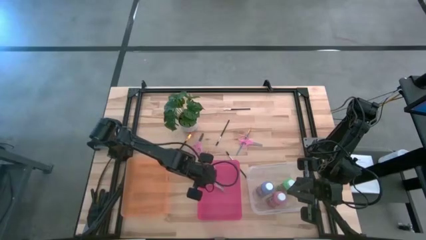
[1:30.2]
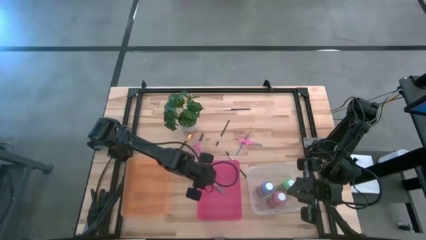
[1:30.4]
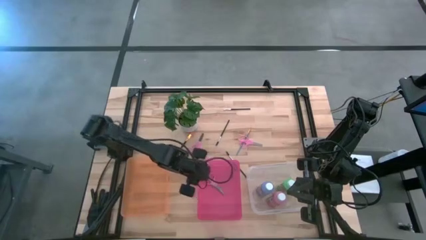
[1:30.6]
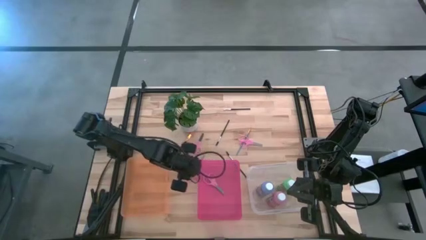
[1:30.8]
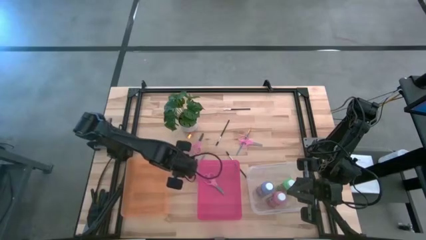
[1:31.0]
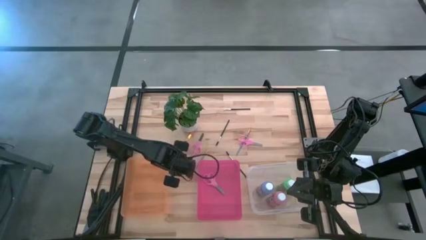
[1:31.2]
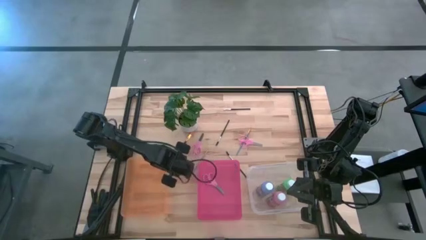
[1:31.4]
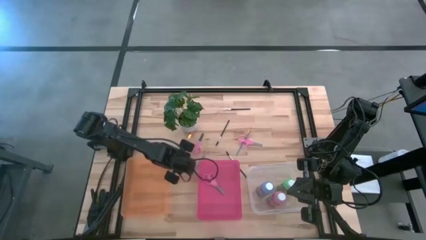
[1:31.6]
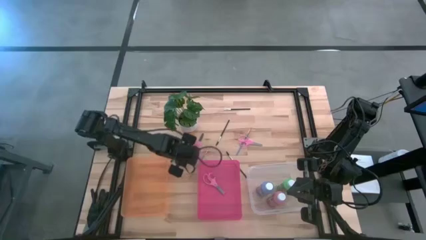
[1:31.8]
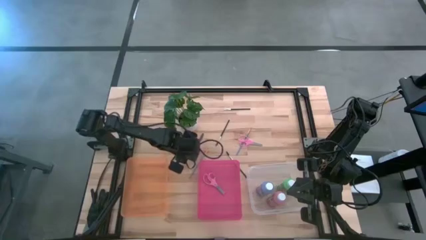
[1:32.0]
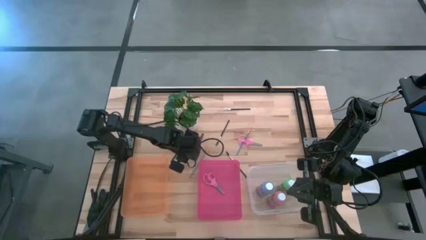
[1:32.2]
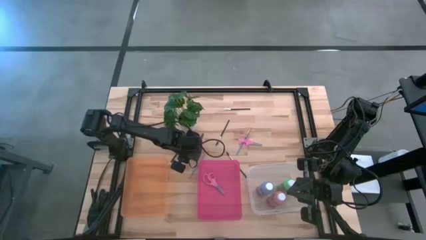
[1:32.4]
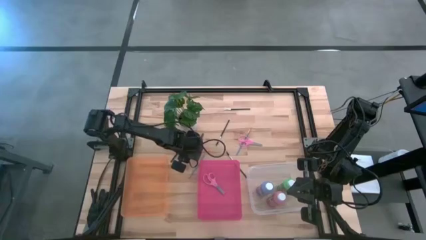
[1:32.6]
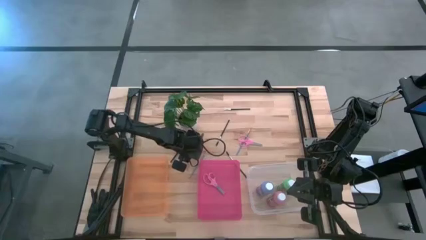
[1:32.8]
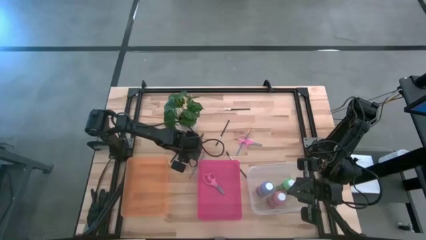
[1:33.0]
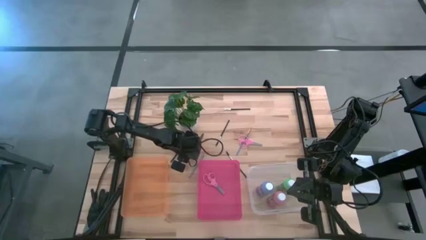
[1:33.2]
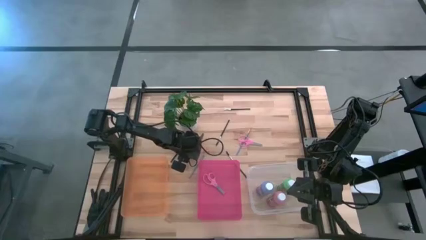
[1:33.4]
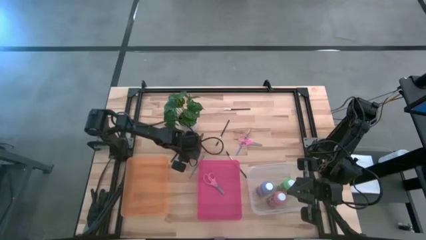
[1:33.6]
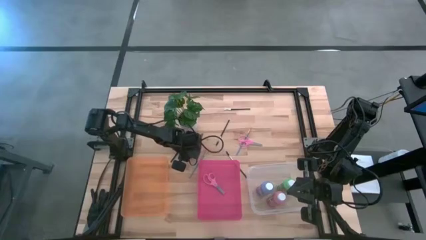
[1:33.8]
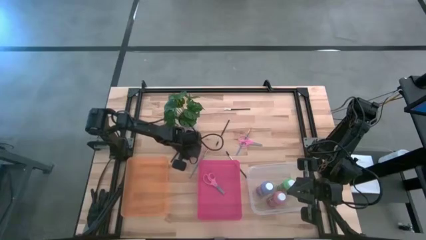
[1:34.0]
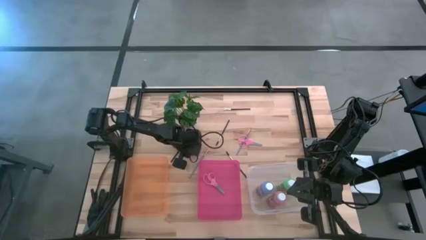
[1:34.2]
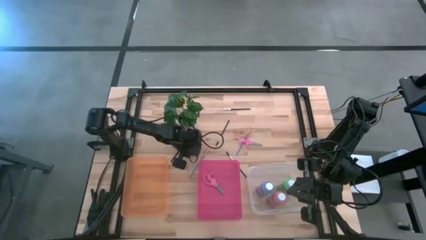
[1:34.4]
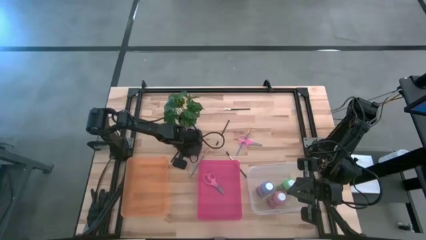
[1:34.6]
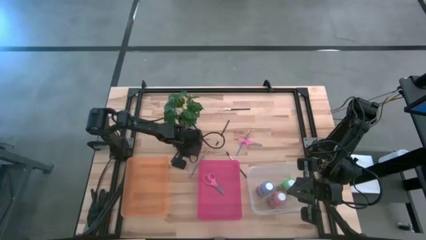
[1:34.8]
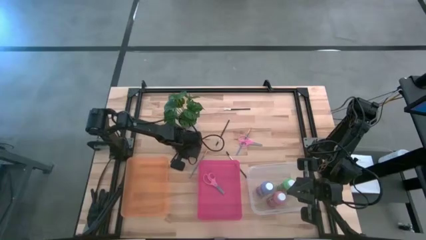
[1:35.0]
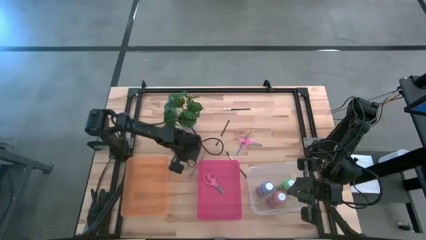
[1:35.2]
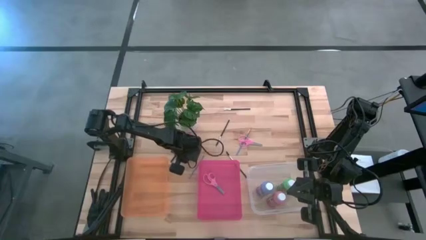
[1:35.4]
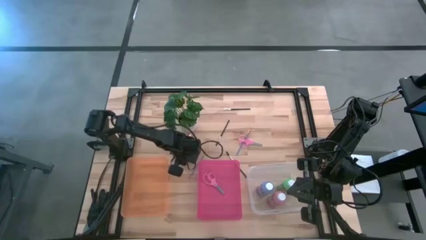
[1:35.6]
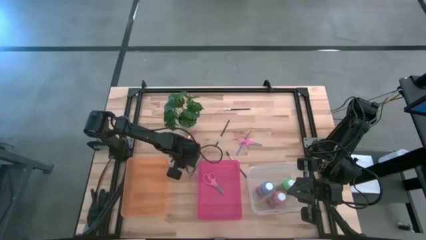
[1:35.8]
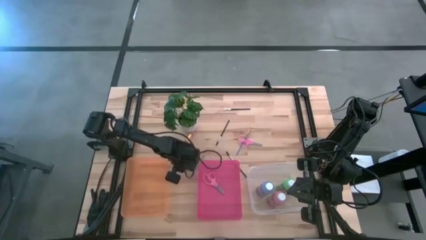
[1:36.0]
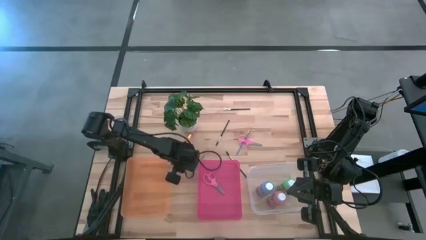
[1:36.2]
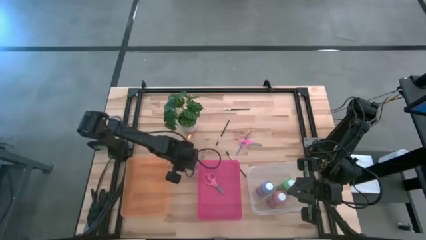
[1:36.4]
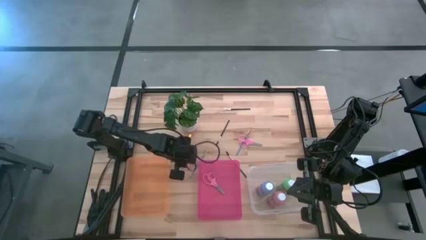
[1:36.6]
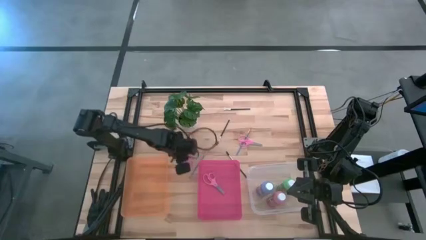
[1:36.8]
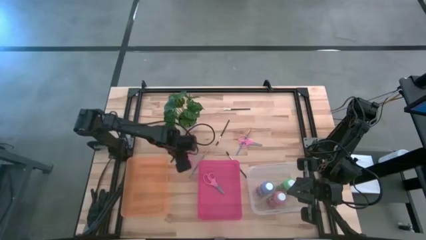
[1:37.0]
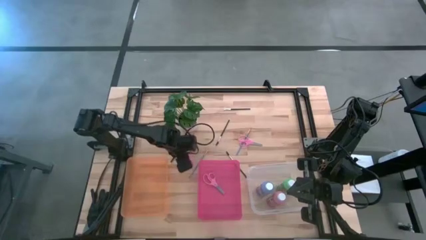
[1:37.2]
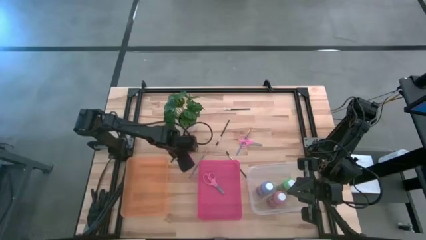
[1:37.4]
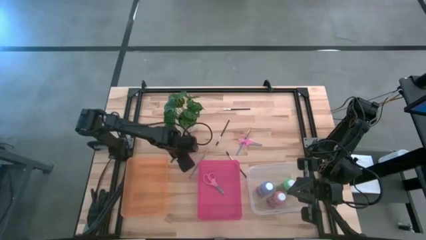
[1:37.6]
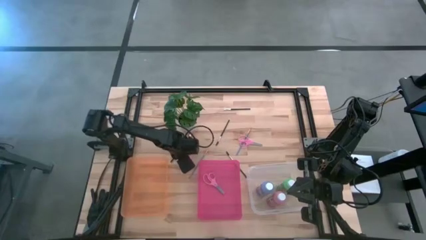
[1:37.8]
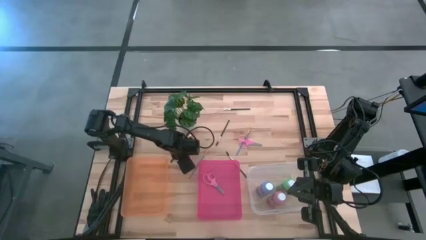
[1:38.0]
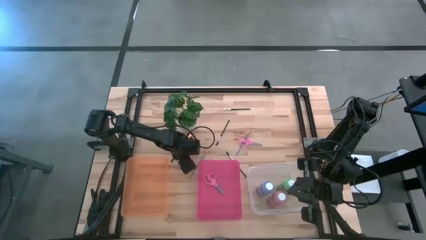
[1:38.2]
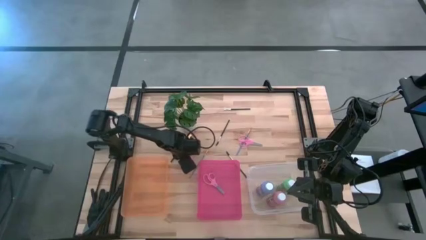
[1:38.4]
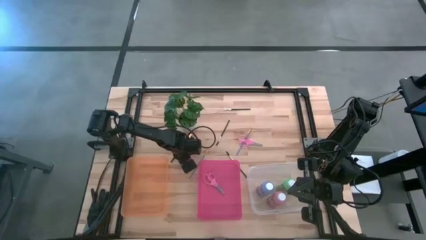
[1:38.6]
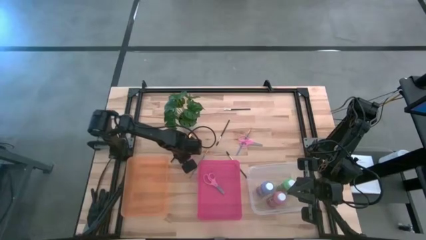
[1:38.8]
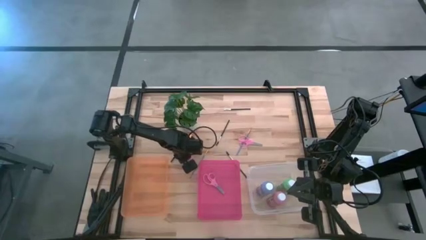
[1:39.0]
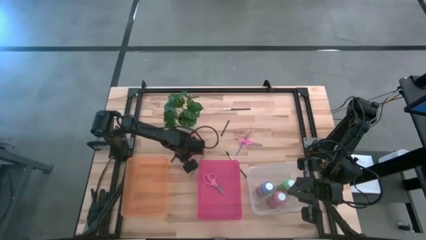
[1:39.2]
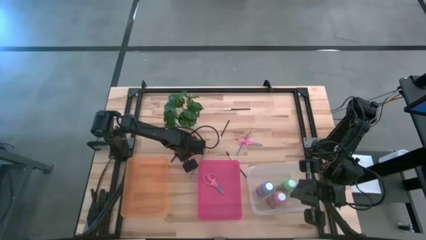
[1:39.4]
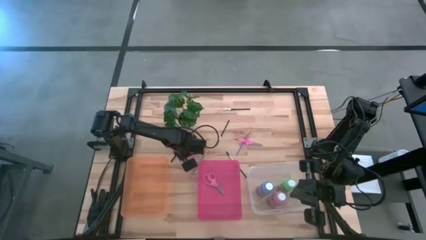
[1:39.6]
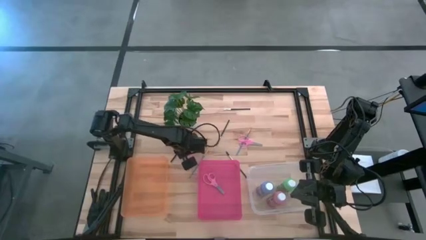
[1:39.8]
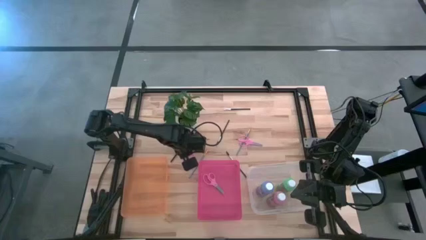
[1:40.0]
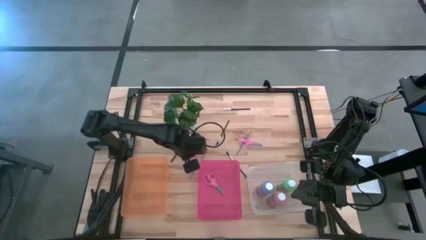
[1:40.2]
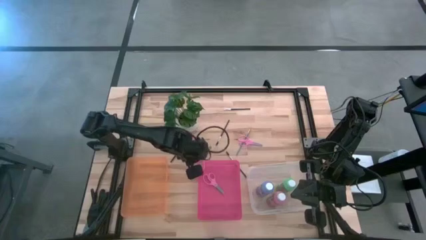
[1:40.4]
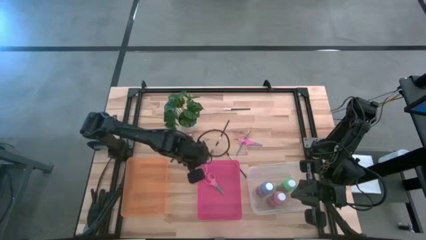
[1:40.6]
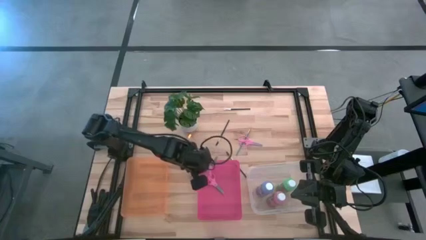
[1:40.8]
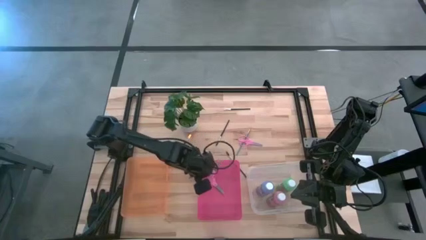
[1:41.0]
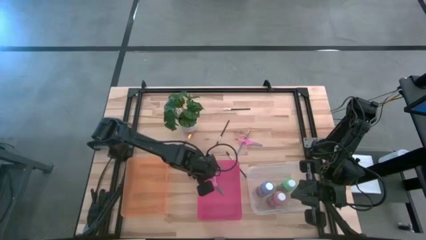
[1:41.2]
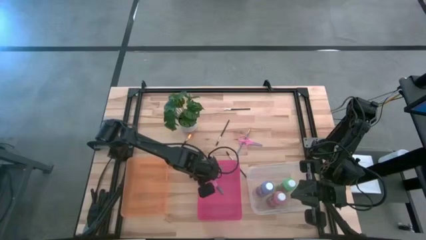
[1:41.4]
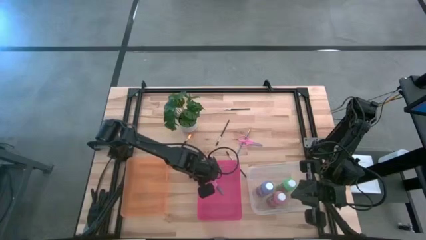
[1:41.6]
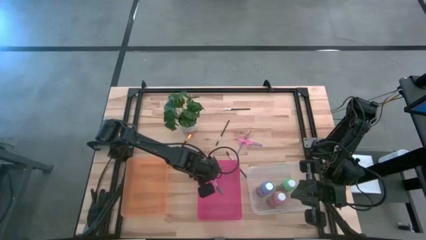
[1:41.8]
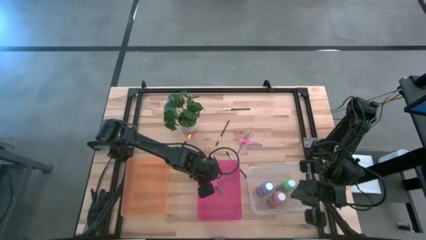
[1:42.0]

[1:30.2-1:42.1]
Task: Pick & Place Paint Supplies
Put the left pink scissors into the pink bin

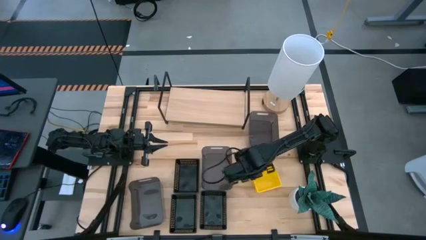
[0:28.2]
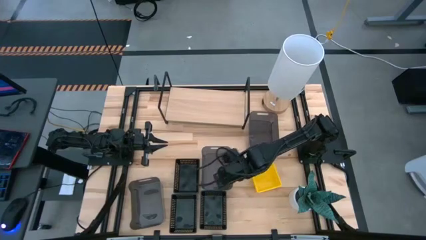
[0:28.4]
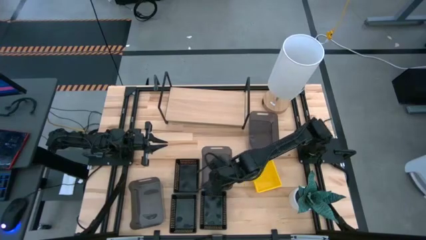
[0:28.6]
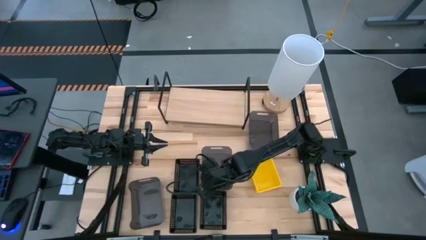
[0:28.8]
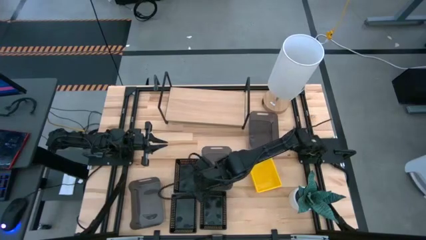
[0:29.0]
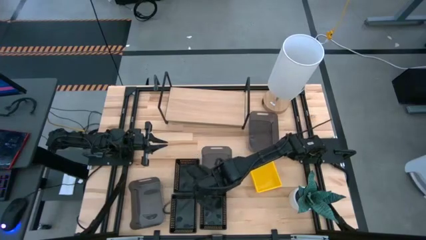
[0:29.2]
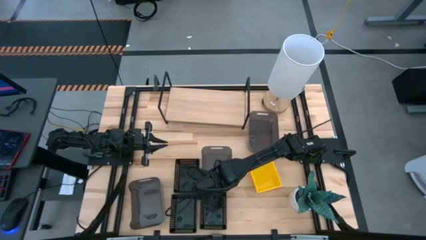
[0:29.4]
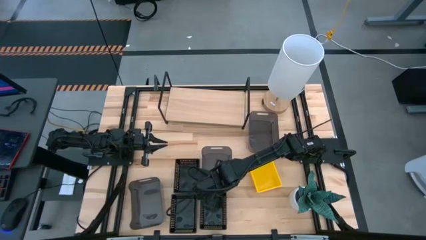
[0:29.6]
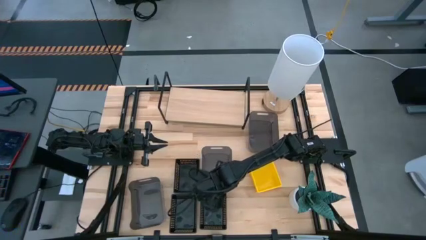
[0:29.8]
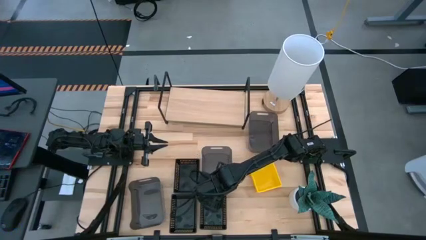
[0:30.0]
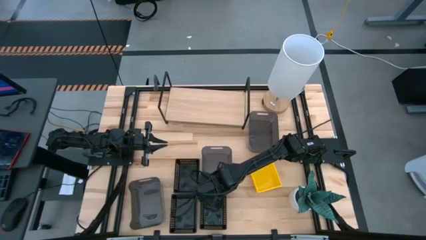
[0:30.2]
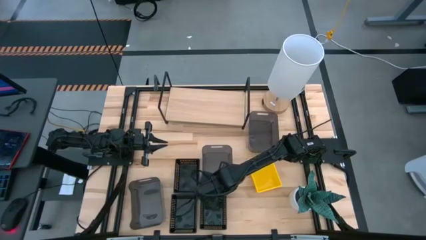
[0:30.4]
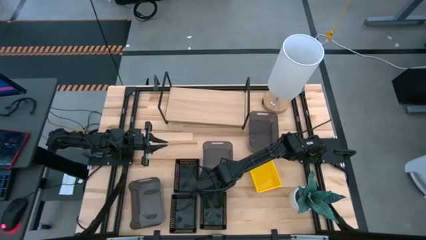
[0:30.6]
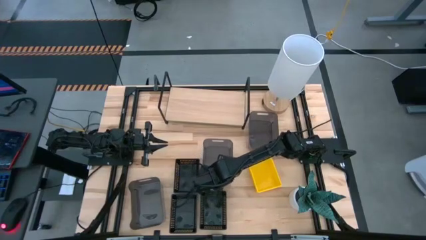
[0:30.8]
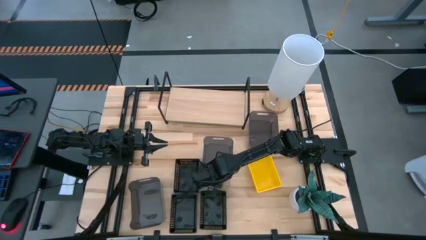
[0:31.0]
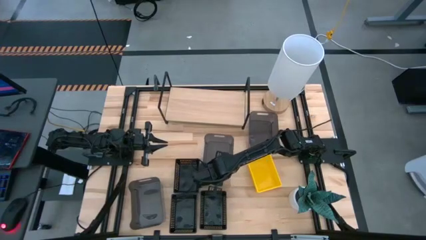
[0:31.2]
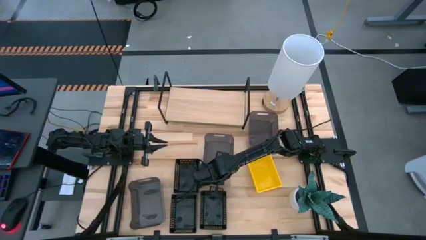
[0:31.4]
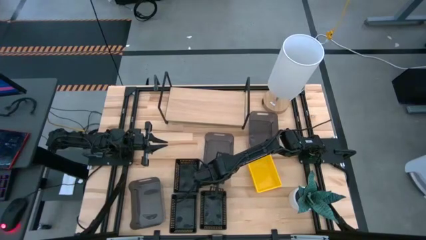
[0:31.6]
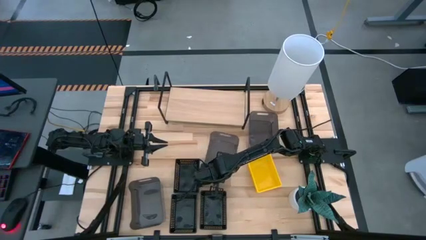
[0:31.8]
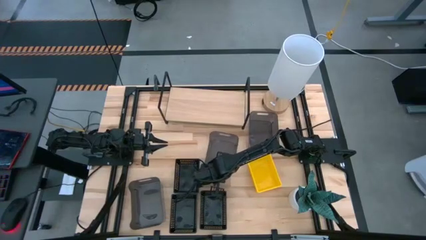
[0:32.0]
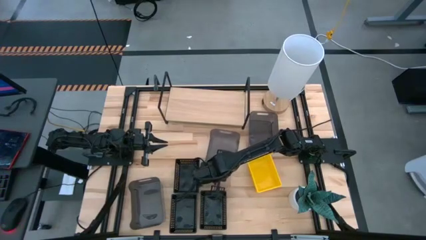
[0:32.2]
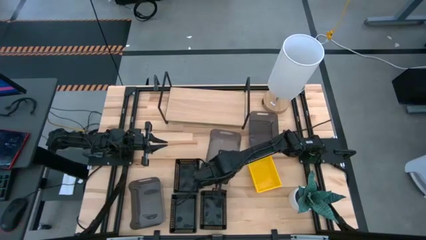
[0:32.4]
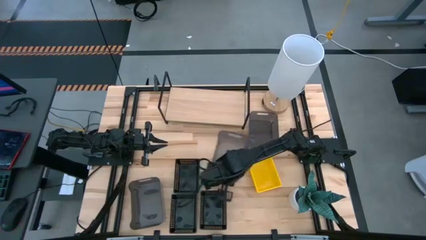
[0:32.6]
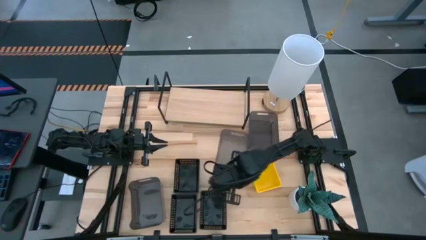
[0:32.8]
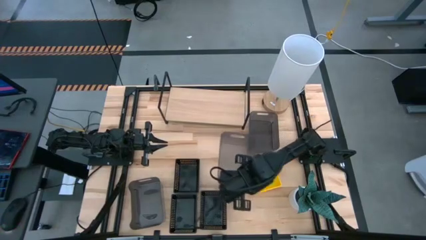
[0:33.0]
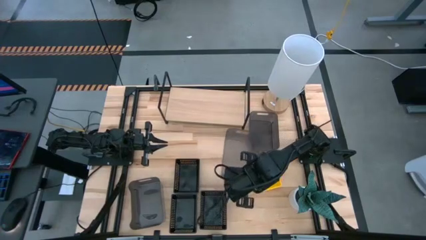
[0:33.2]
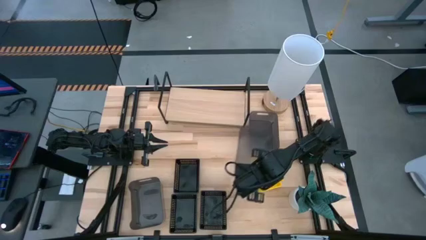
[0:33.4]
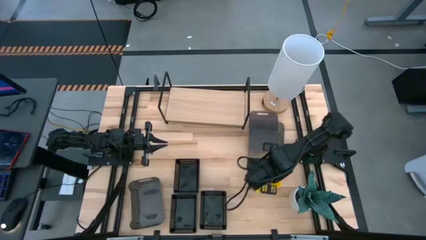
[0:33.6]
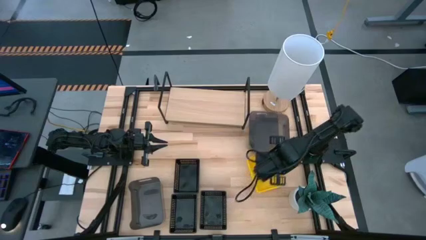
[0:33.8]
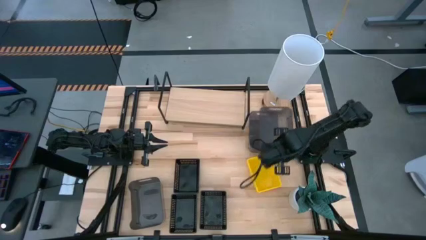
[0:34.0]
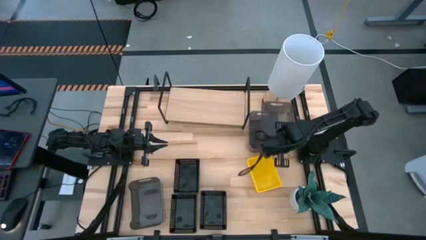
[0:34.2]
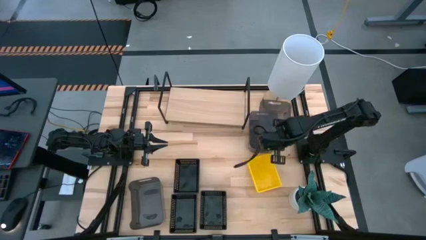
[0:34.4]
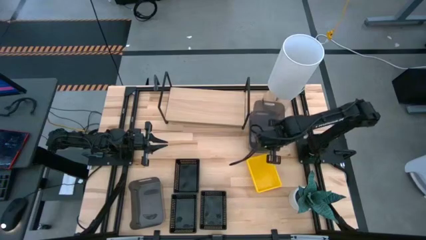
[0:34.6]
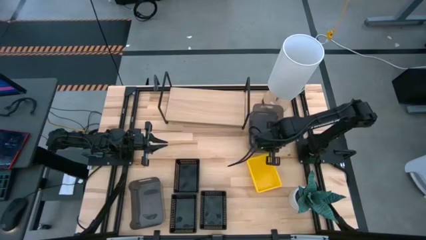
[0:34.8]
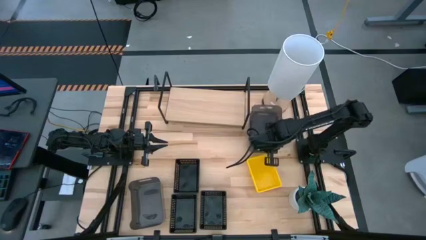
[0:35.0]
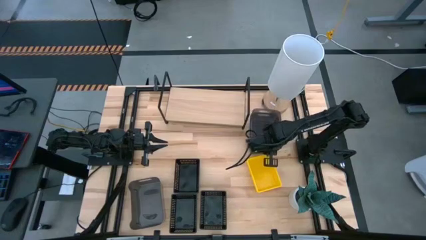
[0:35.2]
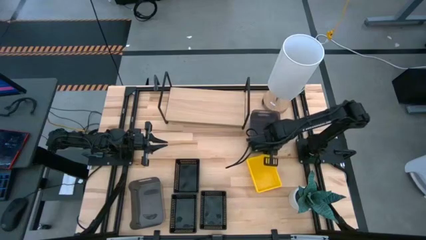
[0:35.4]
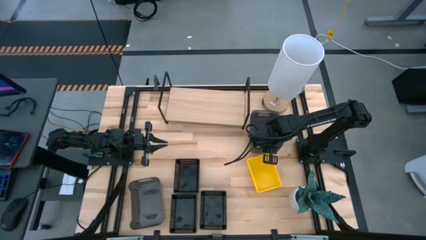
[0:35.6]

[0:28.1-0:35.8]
Task: Stack baskets on shelf by color
Stack the center black transparent bin on the top of the top right black transparent bin
